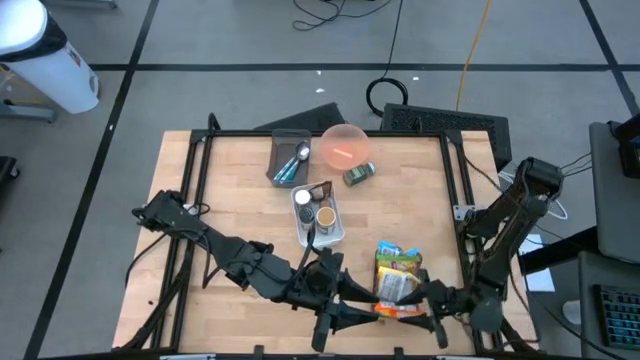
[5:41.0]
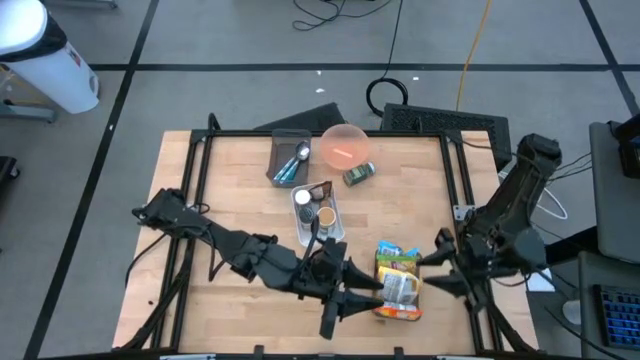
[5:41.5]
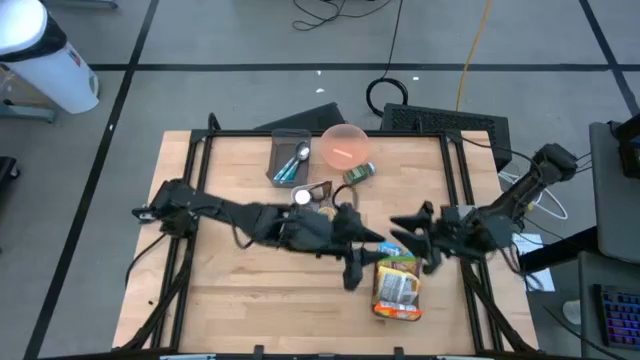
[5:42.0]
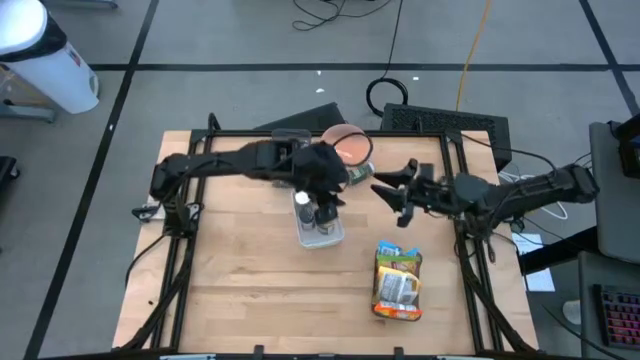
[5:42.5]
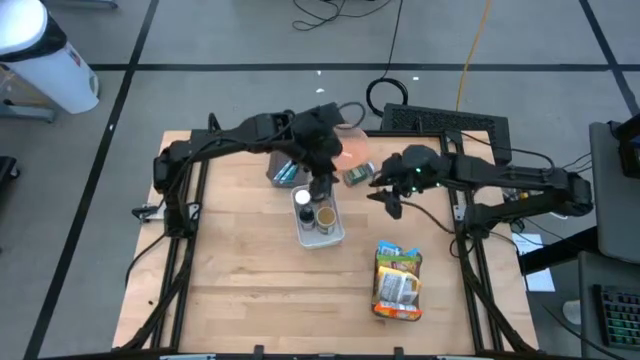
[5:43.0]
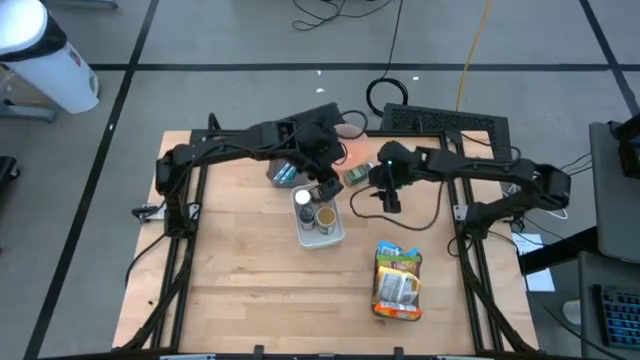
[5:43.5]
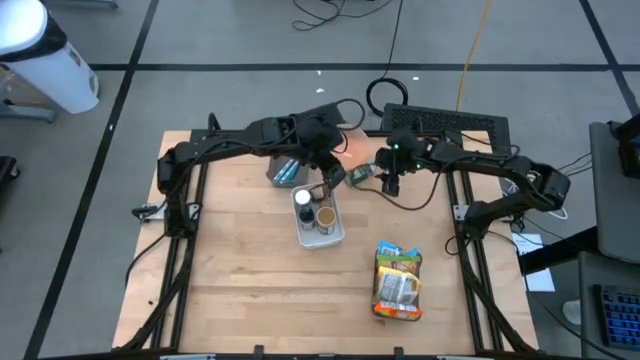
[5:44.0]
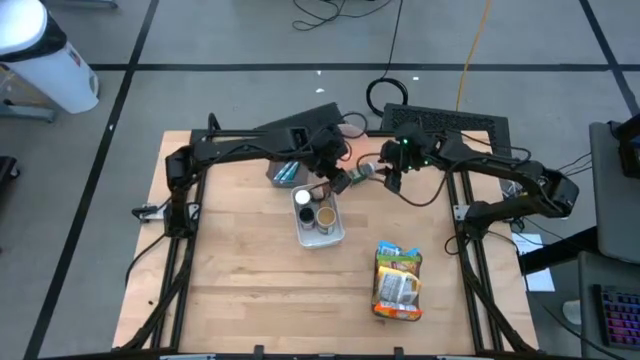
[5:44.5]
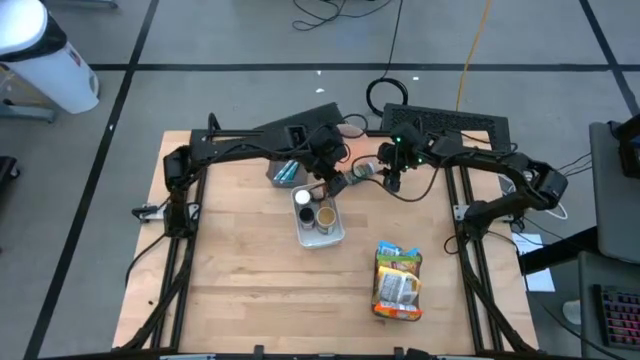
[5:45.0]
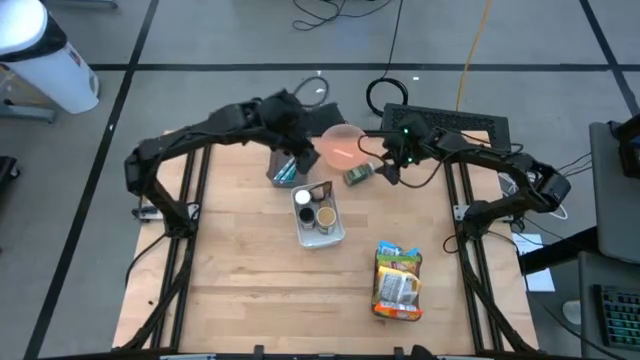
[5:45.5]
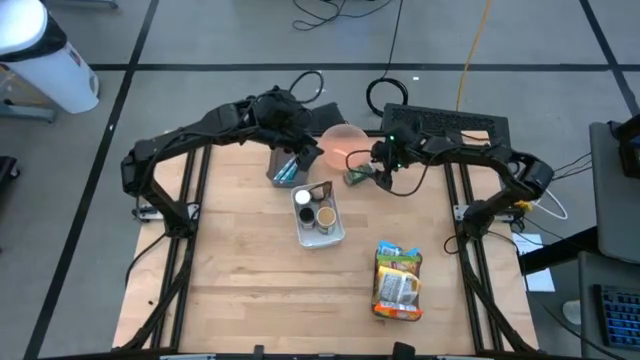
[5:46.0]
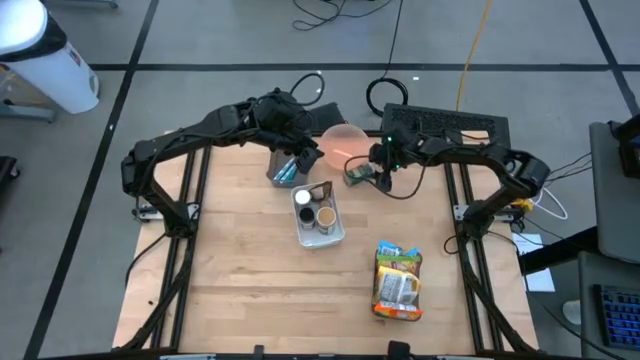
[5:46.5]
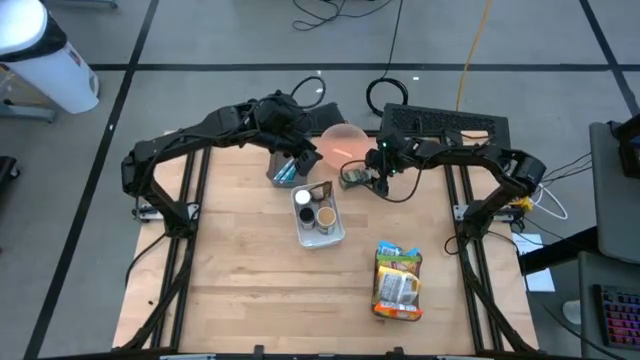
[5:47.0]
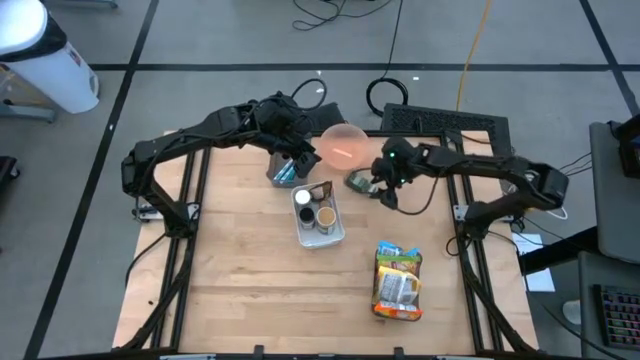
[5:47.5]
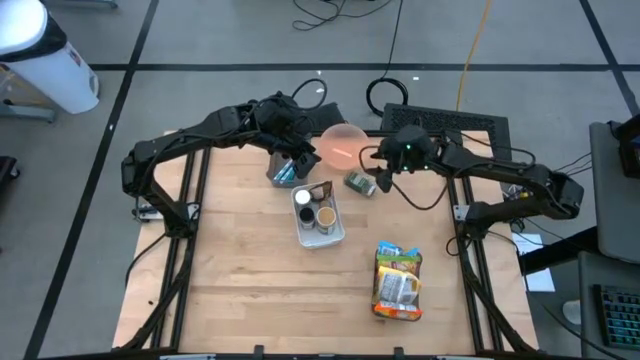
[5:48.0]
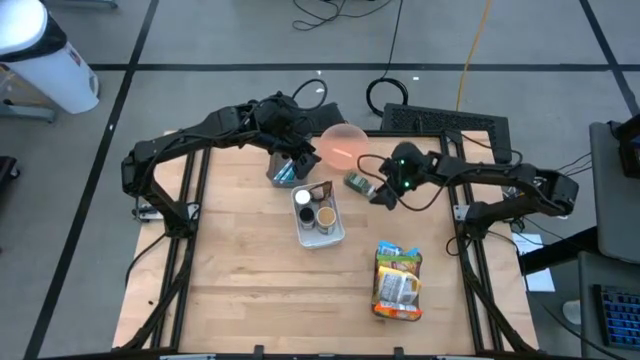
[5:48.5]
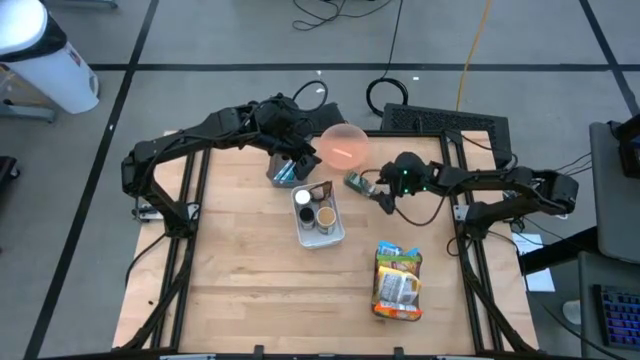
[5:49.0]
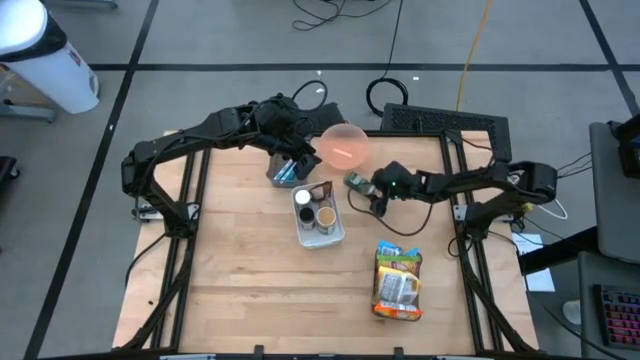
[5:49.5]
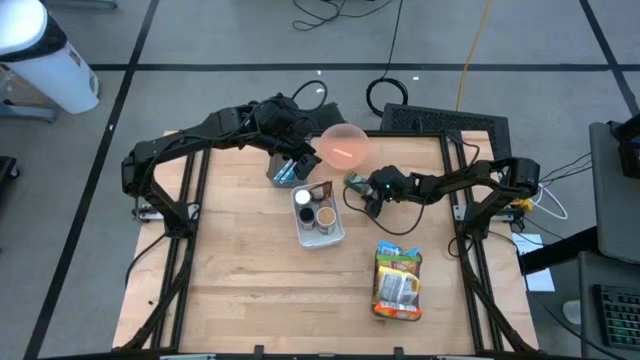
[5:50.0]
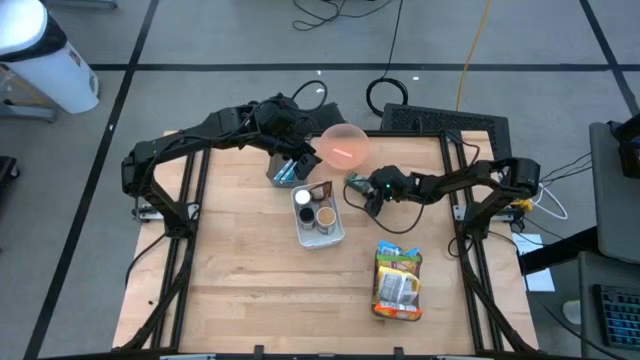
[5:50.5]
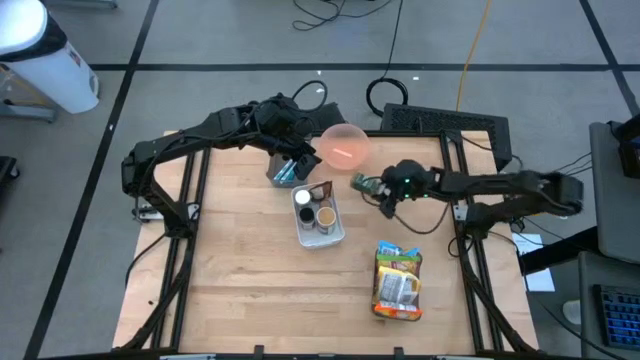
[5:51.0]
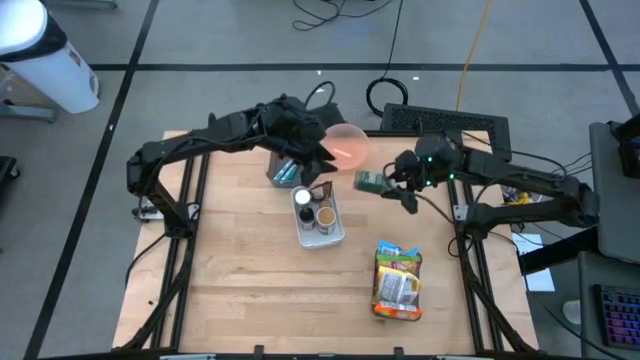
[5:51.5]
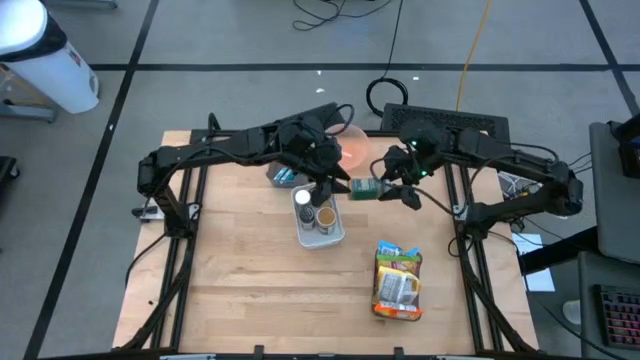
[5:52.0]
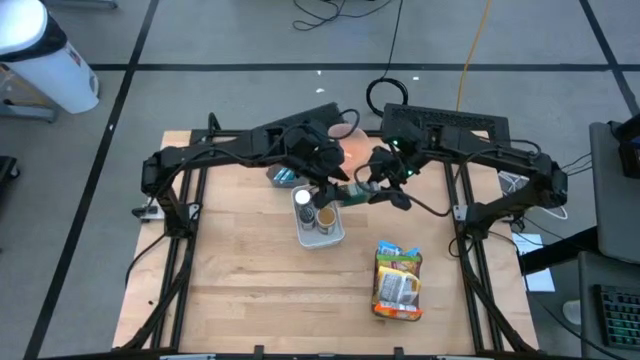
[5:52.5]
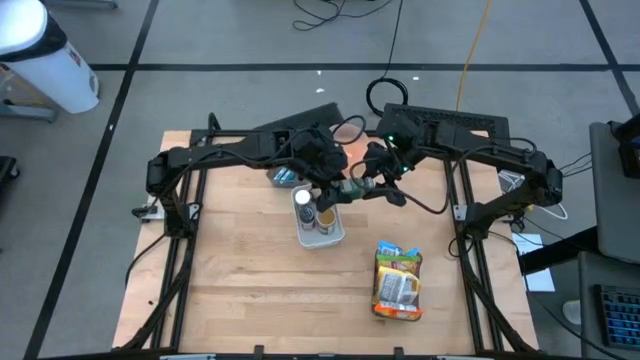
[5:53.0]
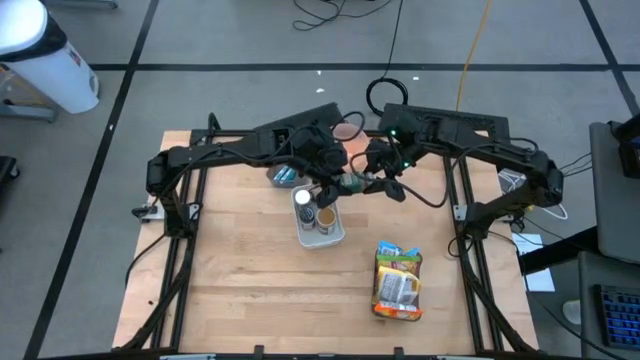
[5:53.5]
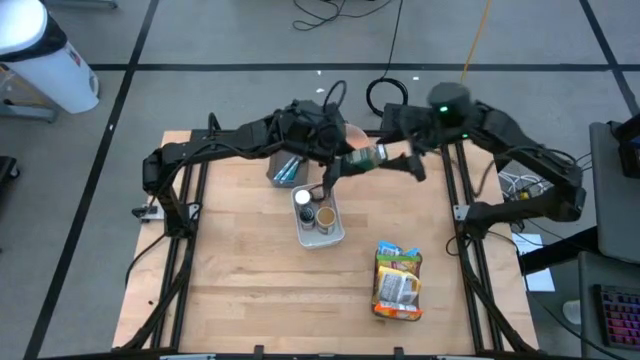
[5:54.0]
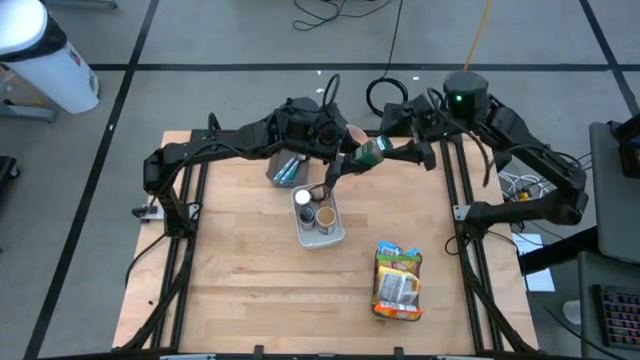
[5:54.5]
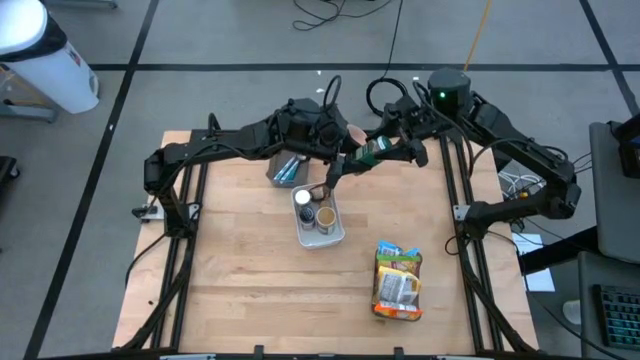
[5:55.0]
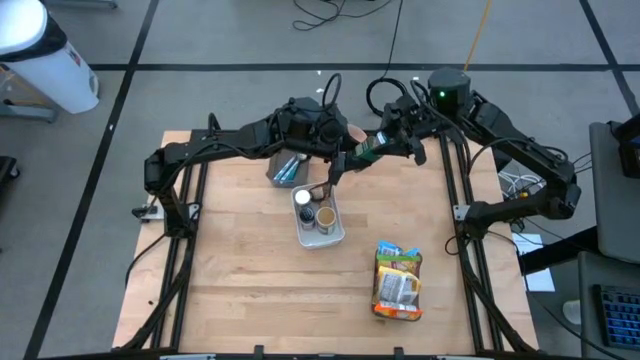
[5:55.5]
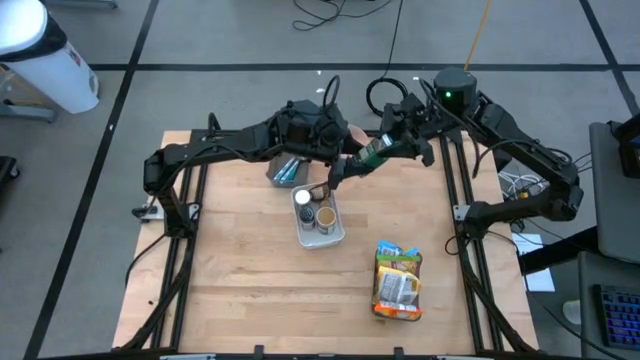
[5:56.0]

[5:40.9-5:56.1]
Task: Pick & Place Food Item
Put the green seasoning bottle into the white bin

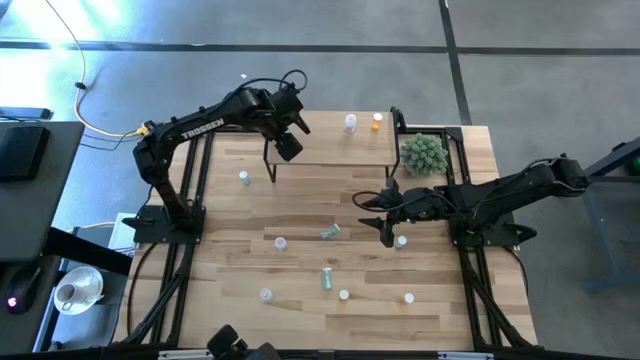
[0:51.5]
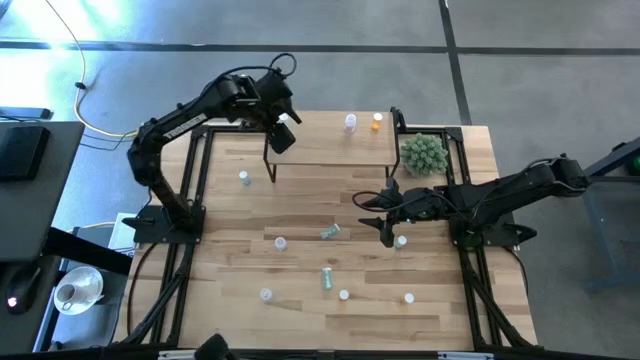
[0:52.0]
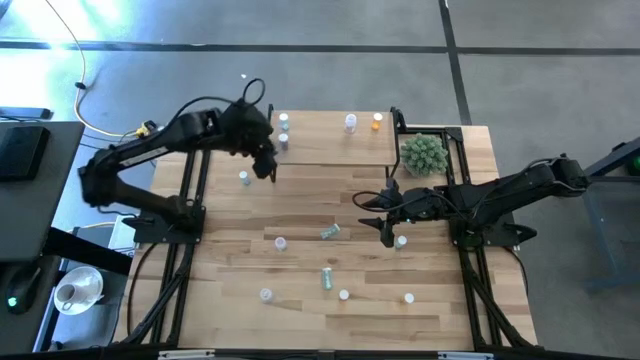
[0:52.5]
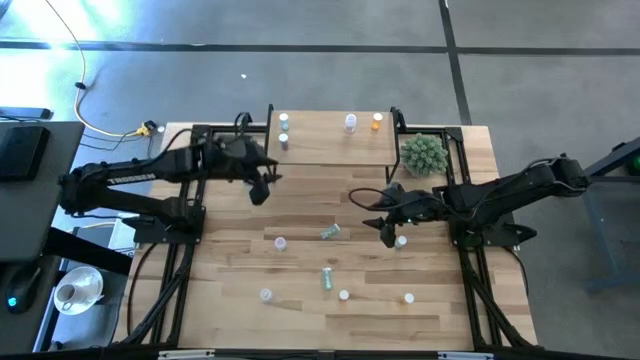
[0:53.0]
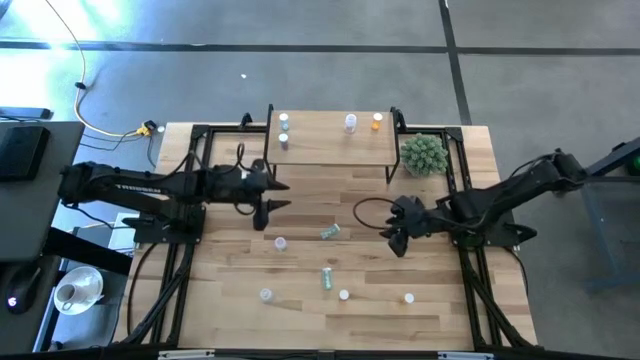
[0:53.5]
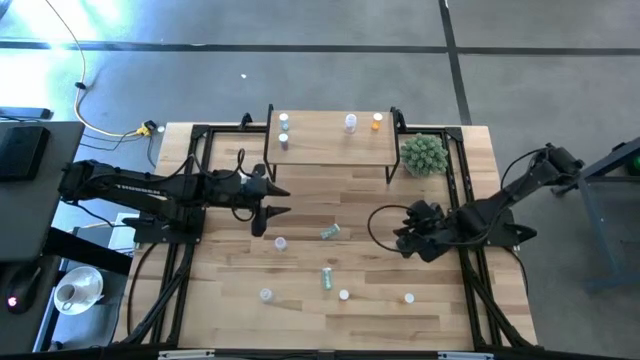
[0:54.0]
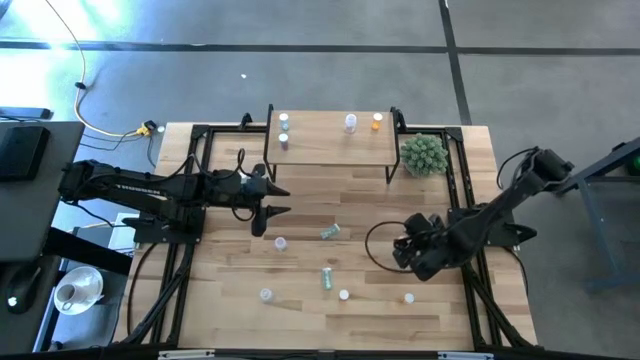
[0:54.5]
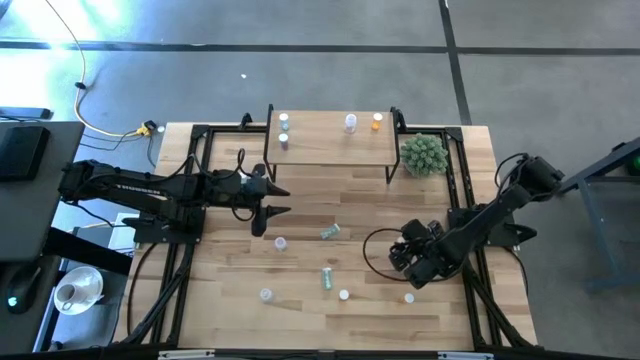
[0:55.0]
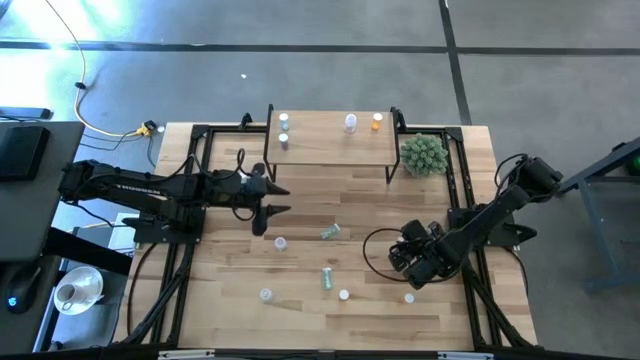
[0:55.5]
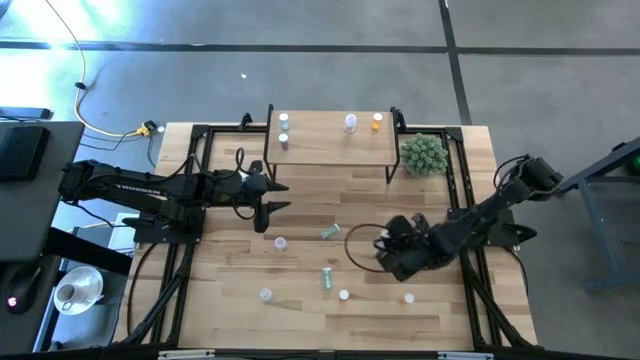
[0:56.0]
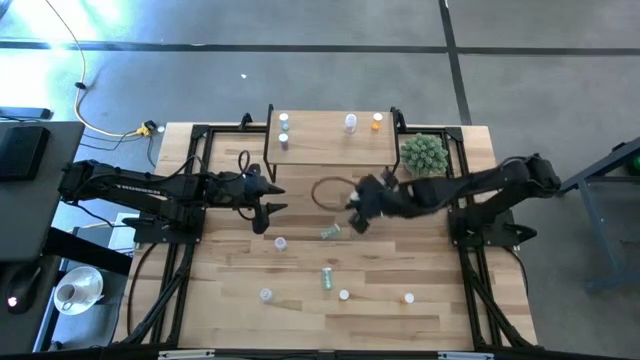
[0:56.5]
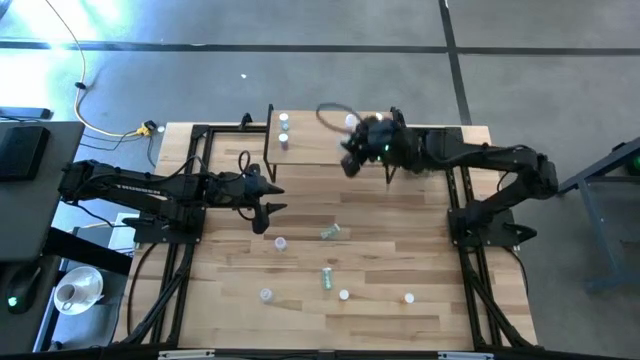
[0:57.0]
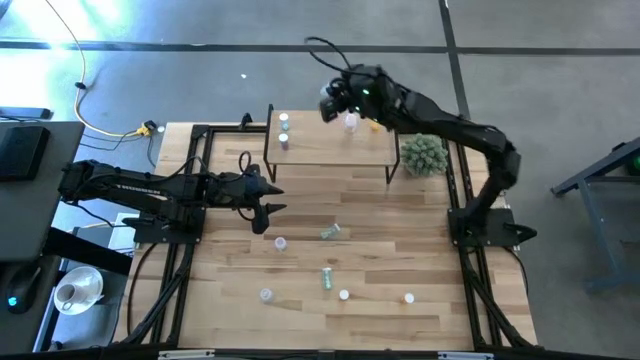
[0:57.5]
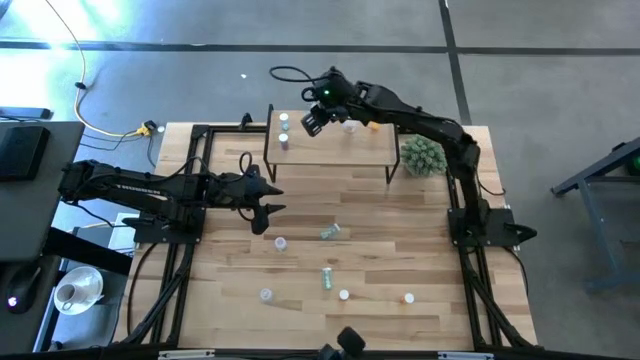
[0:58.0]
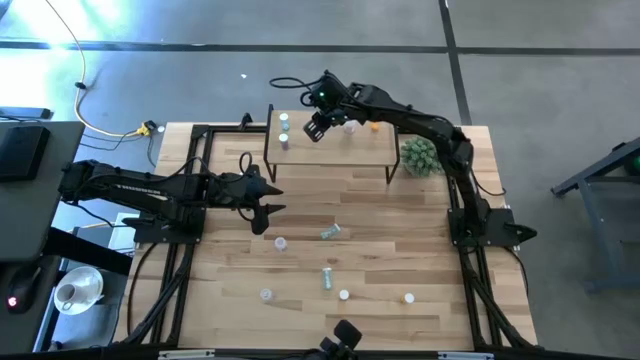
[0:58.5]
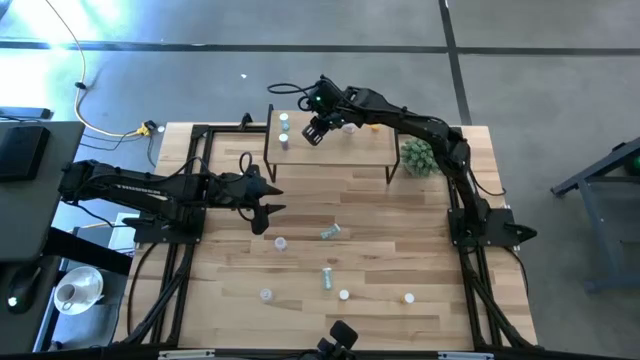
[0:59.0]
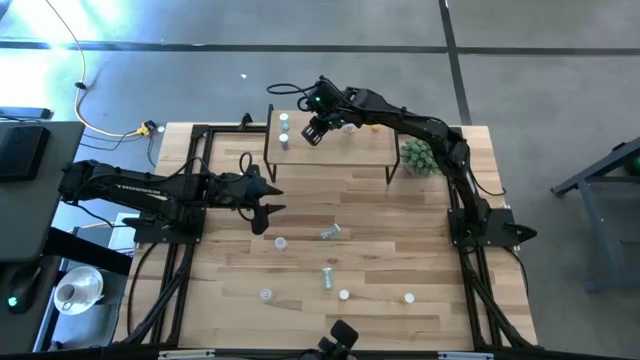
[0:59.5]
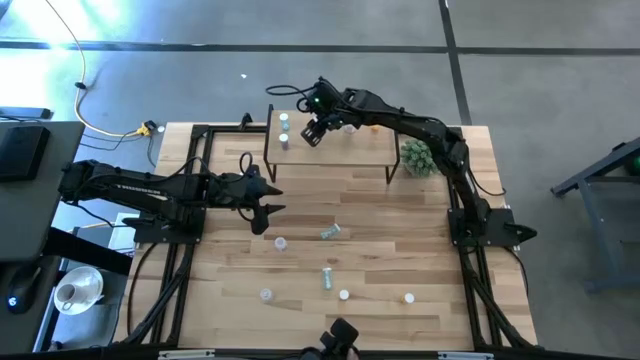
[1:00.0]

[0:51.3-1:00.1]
Task: Pick and place medicine bottles onto shelf by color
Put the top right green pill bottle on the shelf
